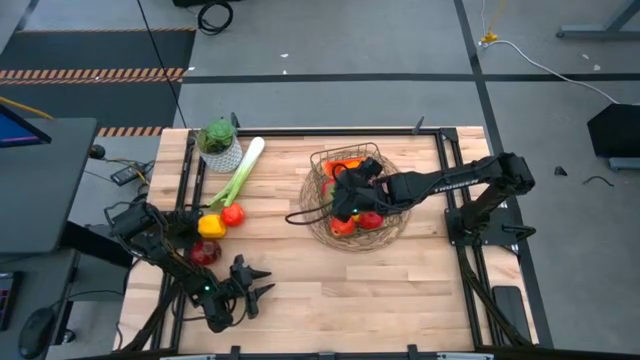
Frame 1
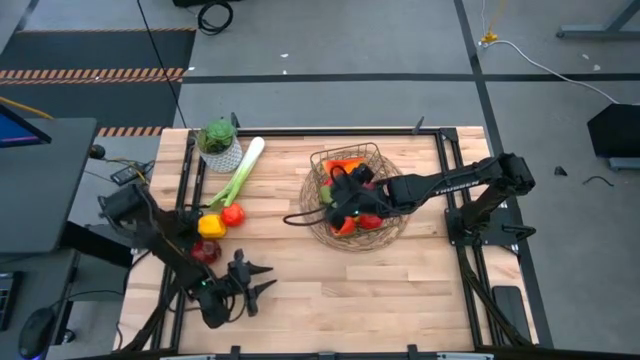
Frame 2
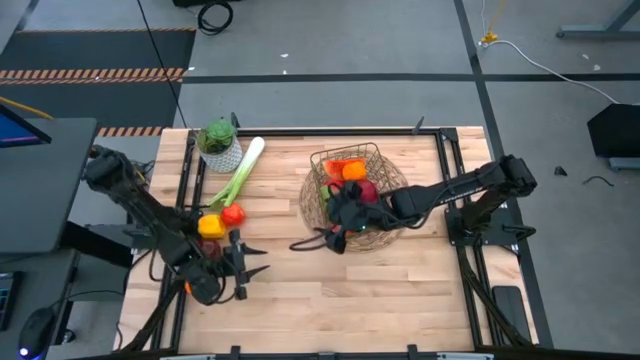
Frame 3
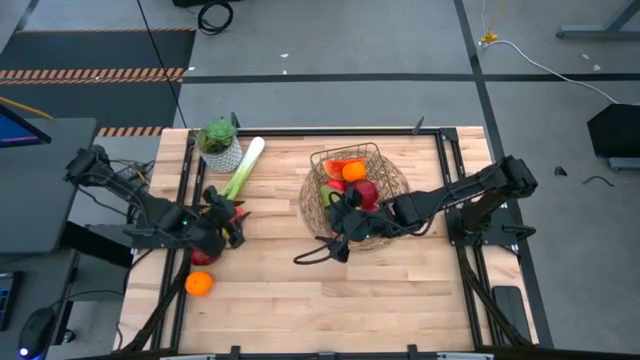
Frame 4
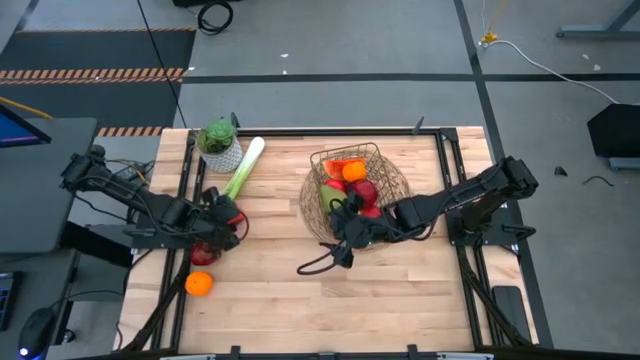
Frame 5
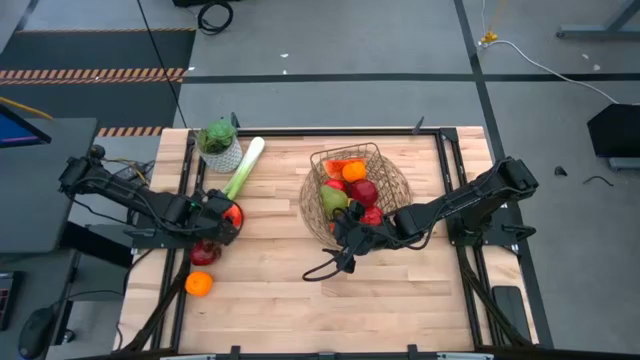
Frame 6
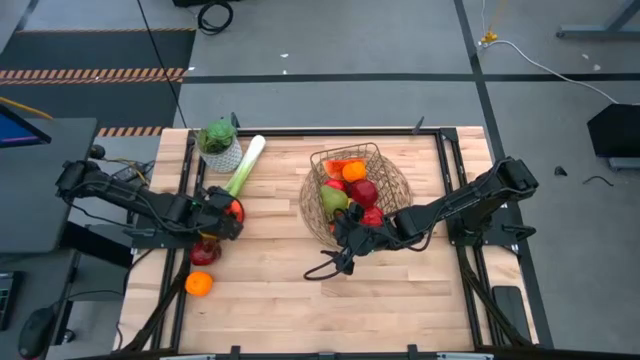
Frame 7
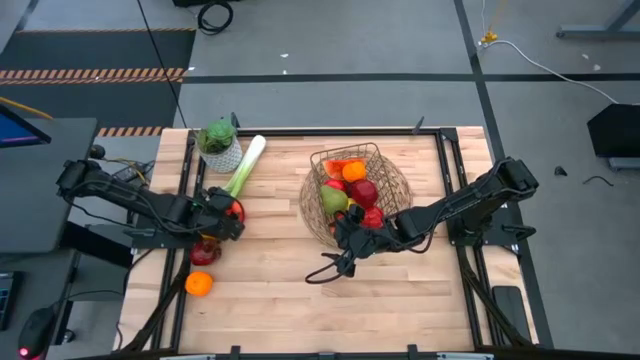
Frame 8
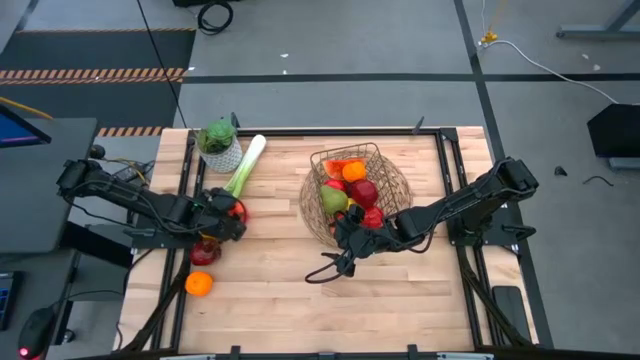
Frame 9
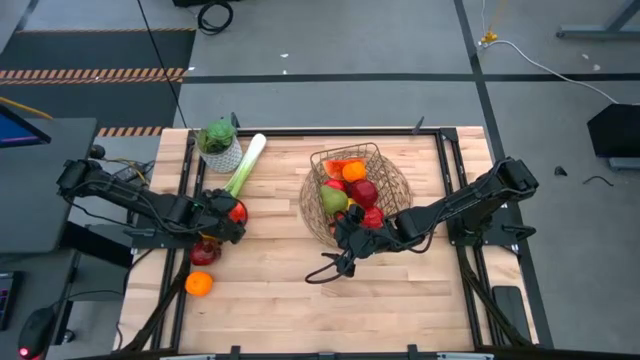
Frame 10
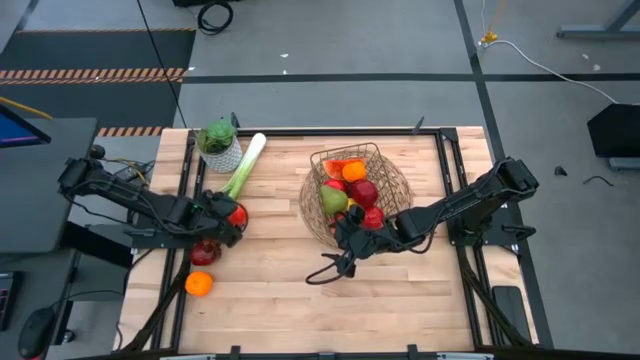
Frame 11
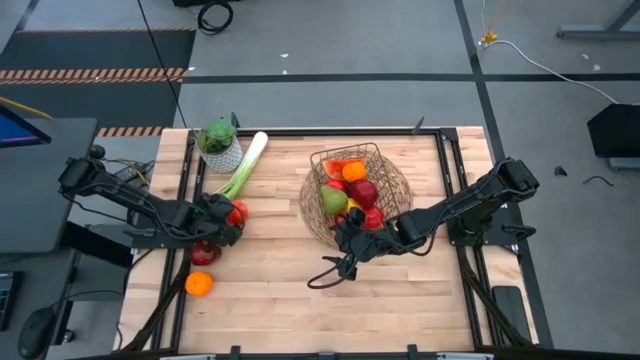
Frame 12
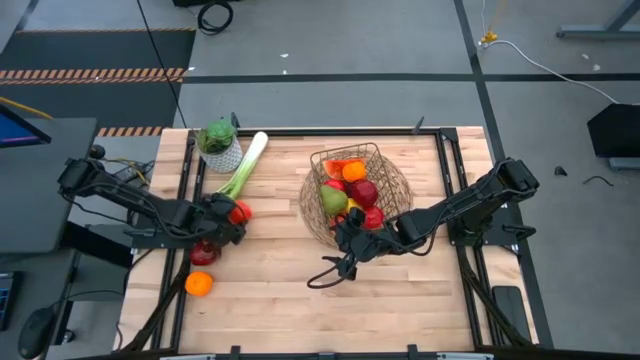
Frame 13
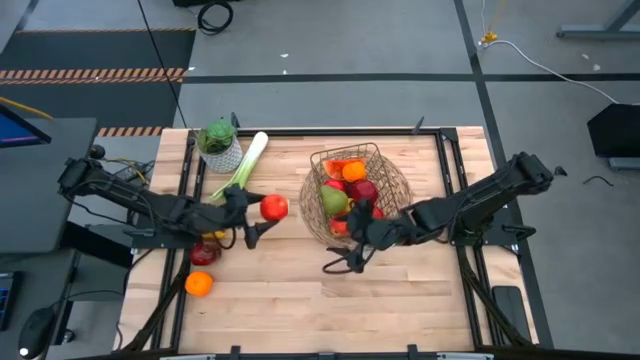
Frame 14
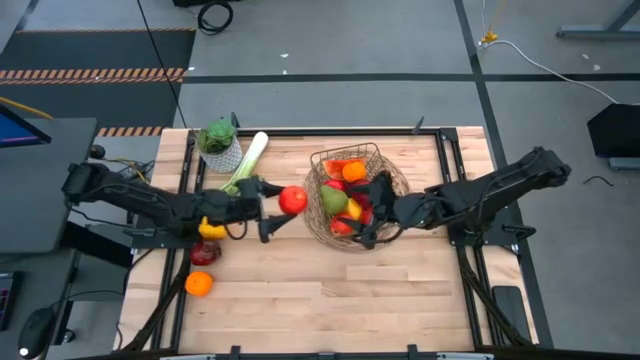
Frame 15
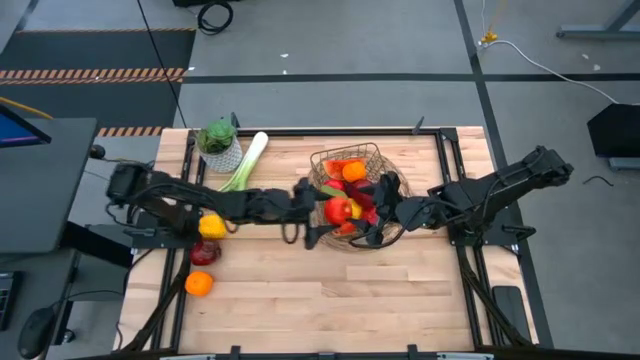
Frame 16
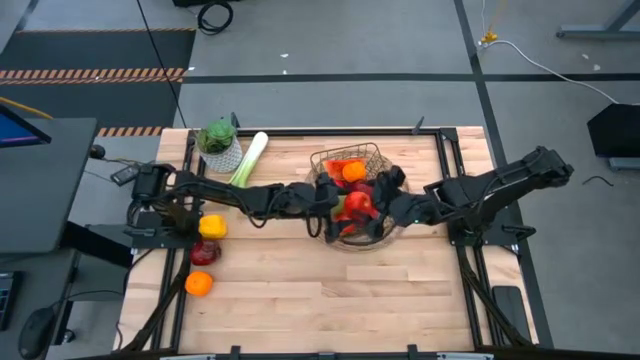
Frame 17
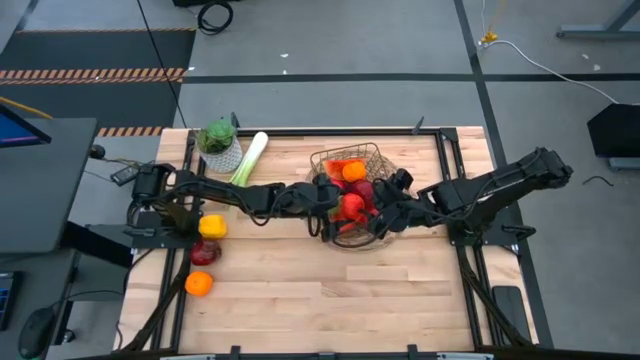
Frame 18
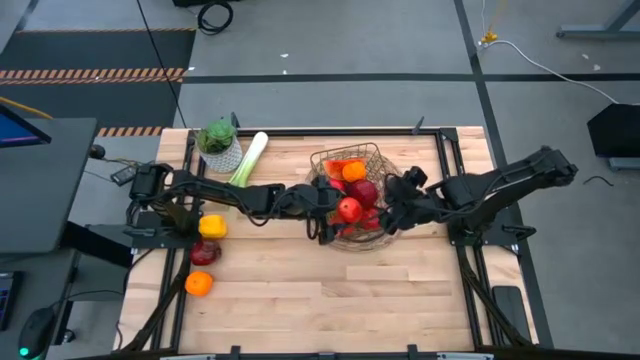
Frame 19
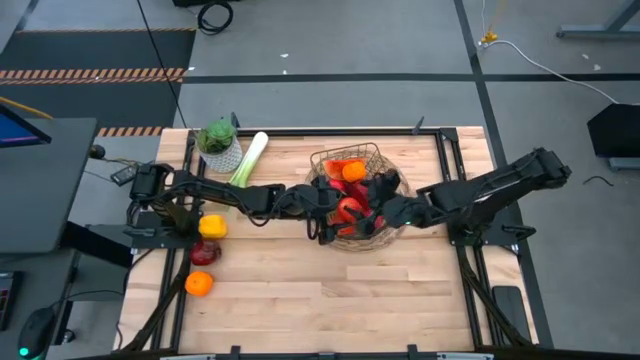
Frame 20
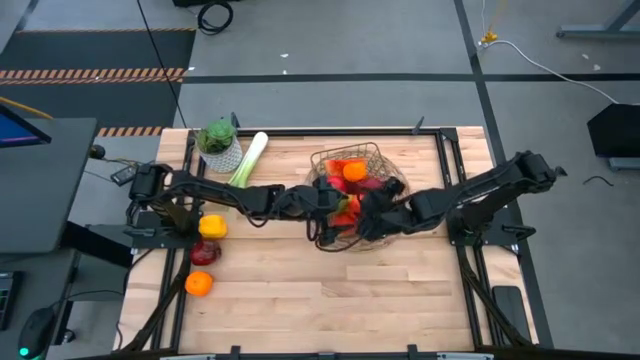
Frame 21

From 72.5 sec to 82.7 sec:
Task: Build produce basket
Put the red apple into the wire basket

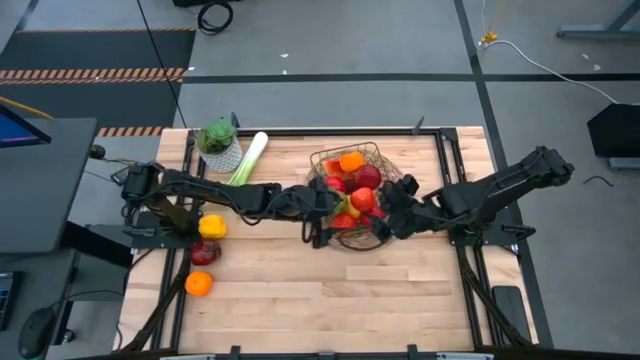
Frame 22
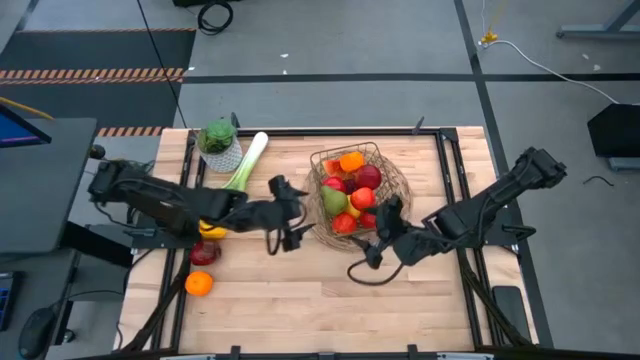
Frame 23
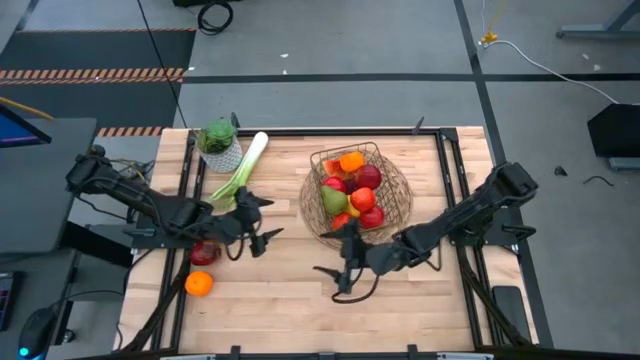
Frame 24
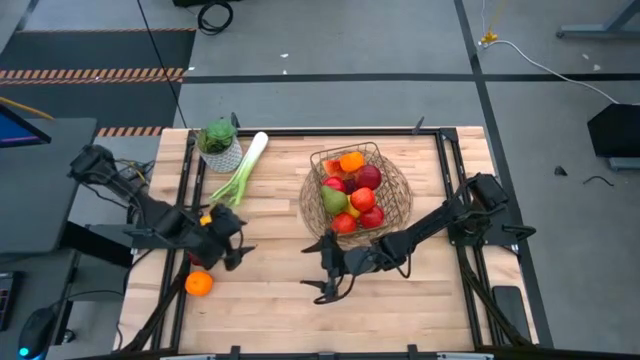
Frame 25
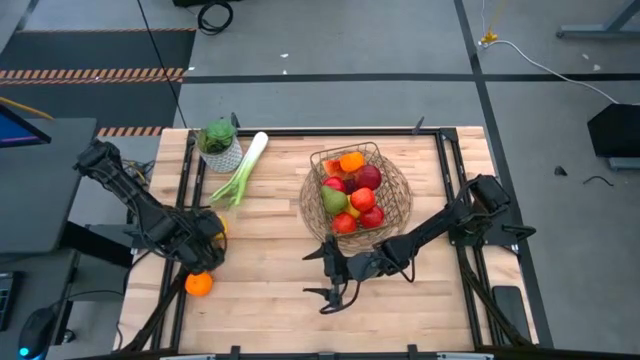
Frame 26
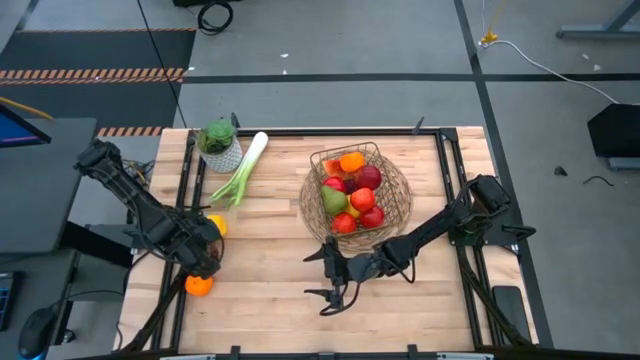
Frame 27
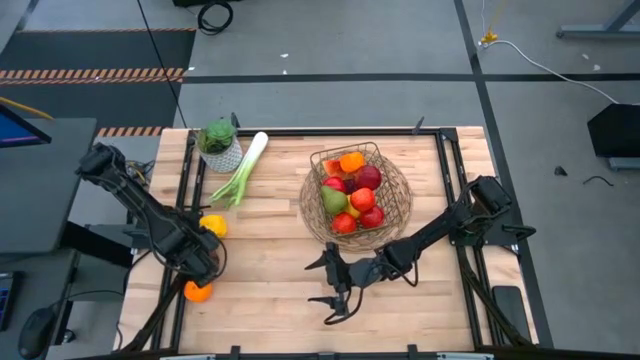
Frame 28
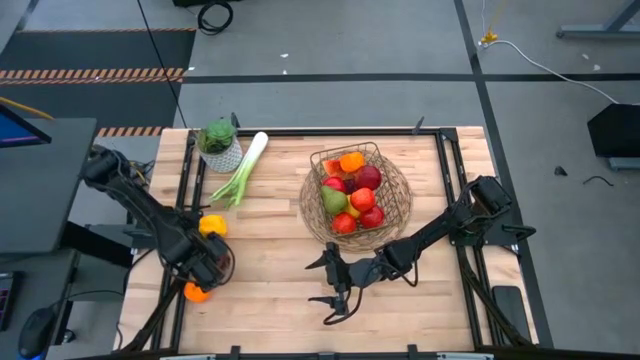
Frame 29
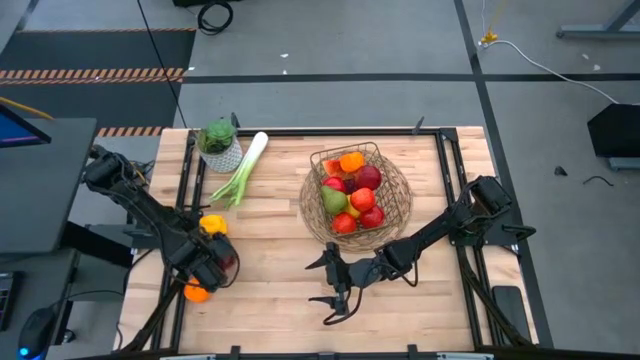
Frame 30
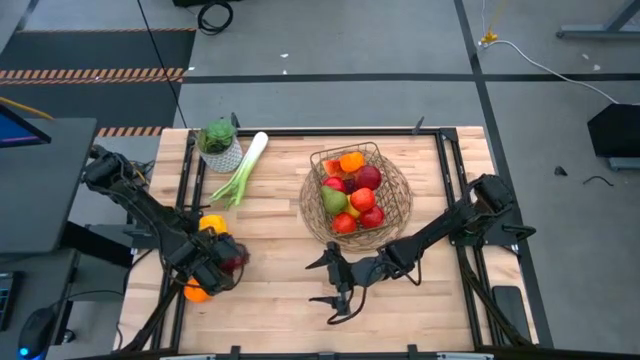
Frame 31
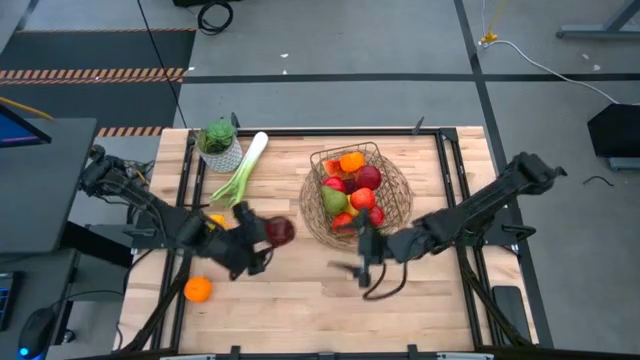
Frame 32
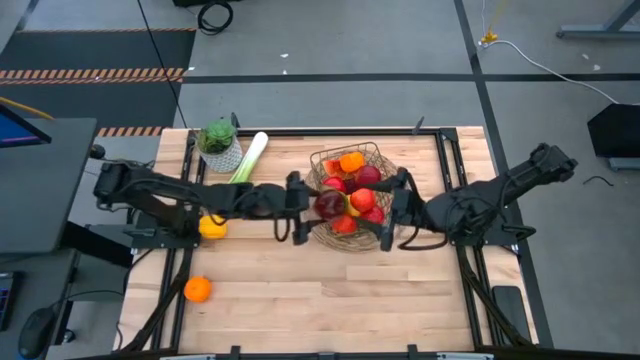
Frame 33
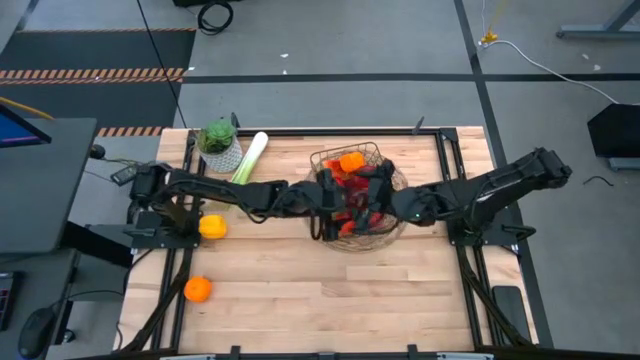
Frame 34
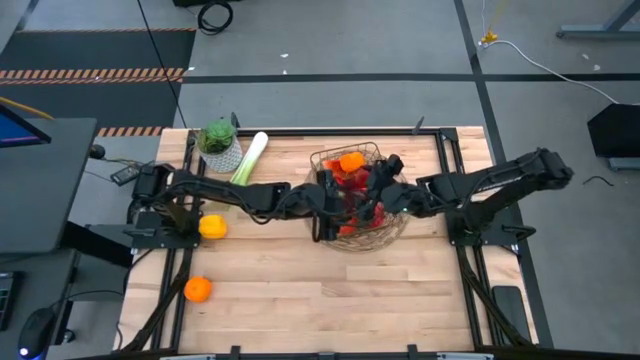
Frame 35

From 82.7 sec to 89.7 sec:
Put the dark red apple into the wire basket

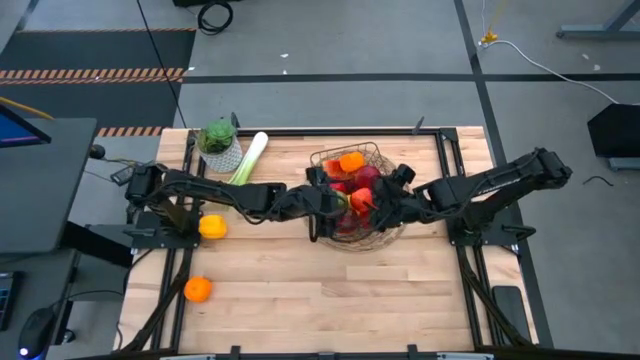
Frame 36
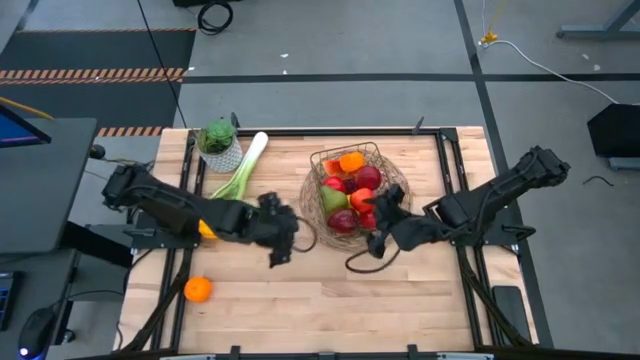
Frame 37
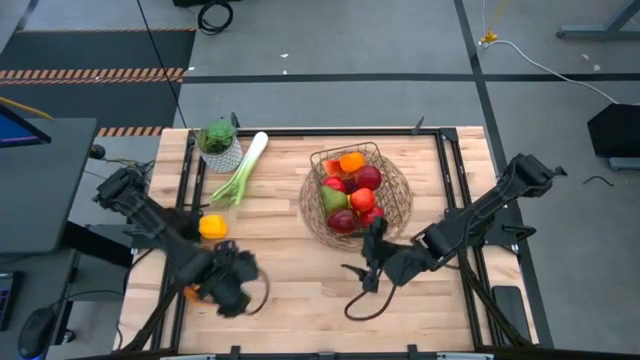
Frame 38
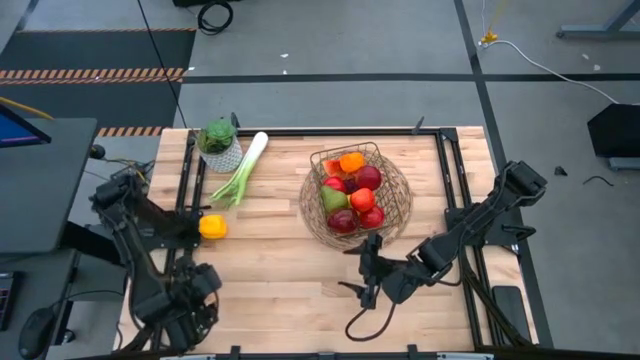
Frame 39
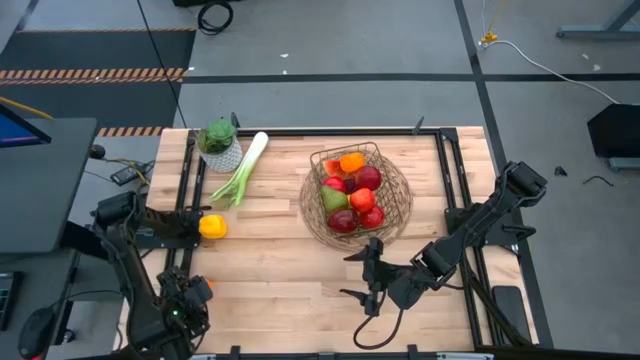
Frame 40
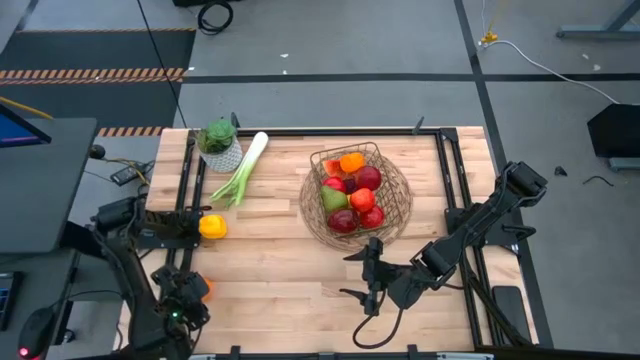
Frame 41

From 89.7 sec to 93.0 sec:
Put the orange into the wire basket
